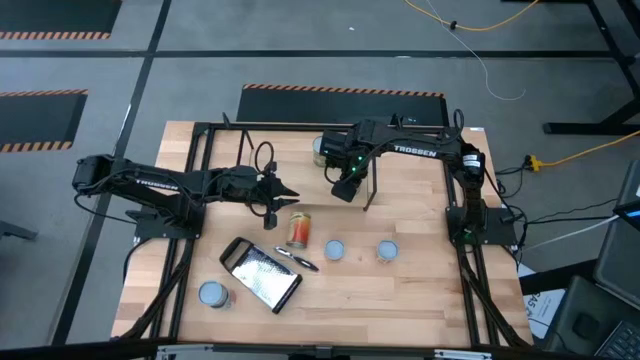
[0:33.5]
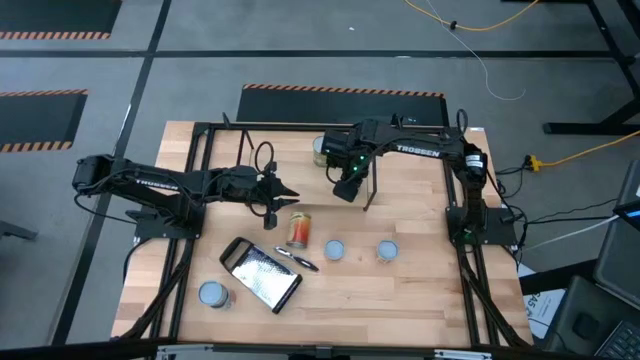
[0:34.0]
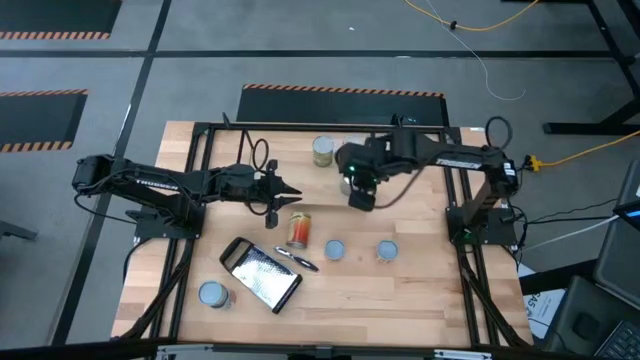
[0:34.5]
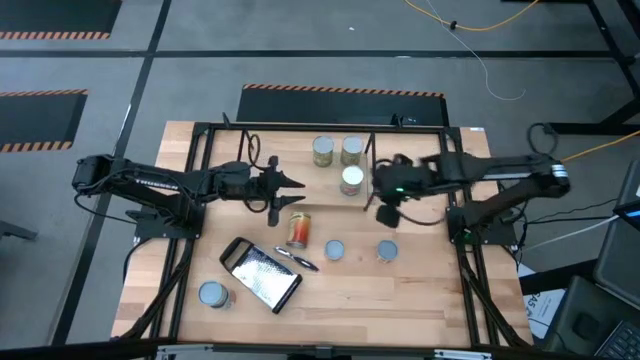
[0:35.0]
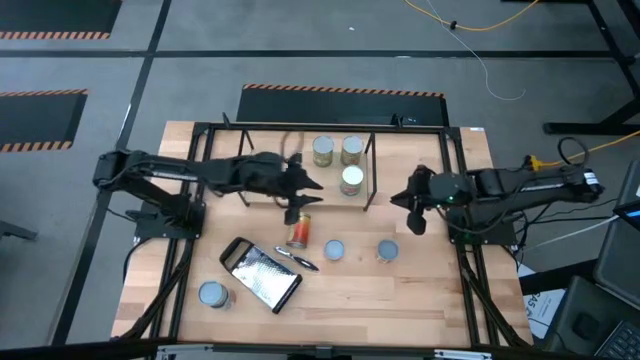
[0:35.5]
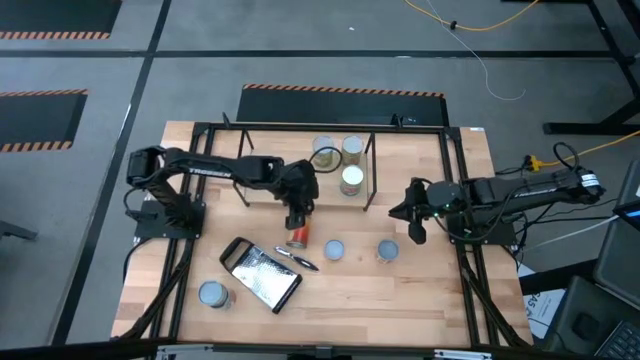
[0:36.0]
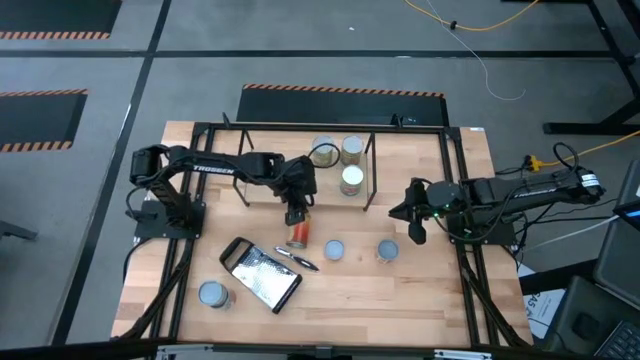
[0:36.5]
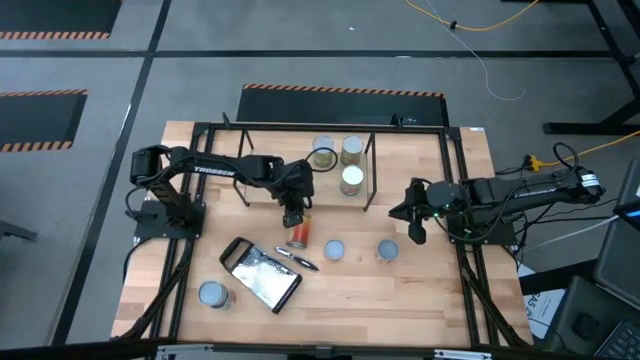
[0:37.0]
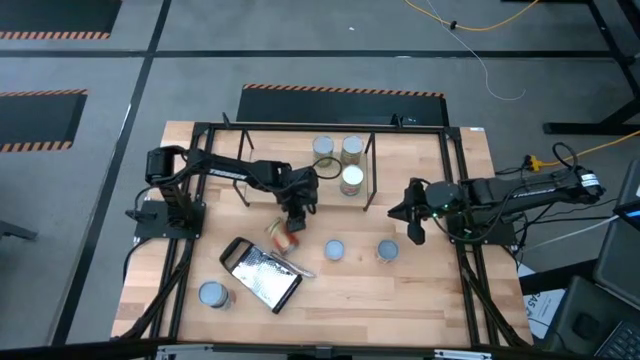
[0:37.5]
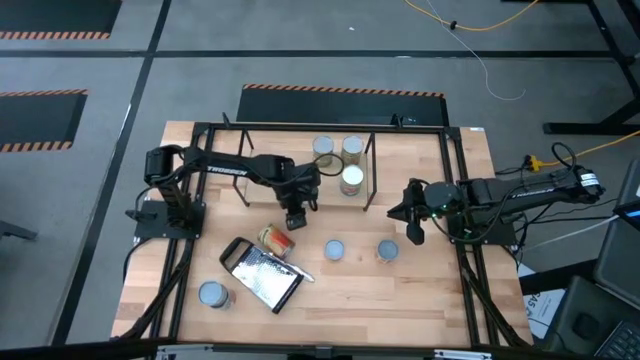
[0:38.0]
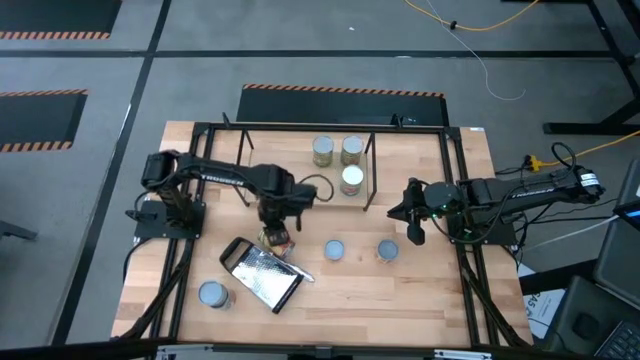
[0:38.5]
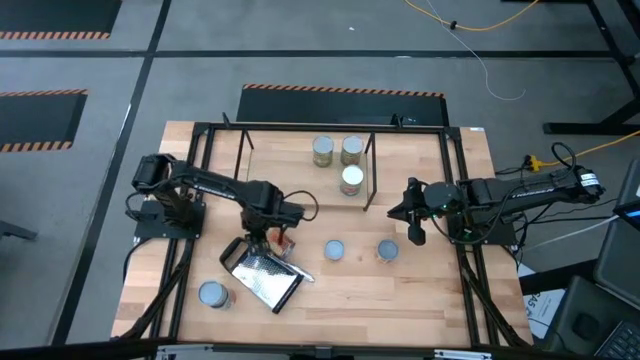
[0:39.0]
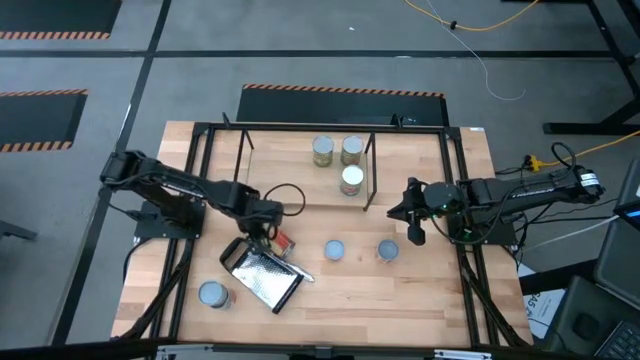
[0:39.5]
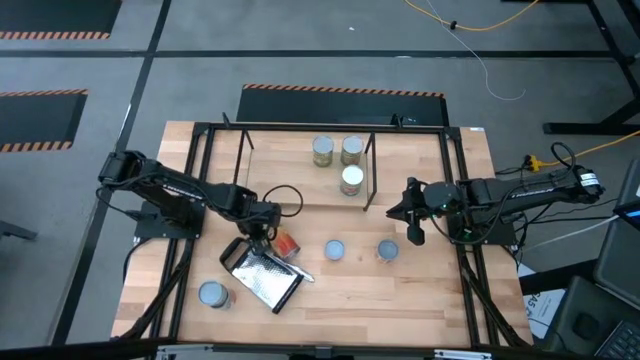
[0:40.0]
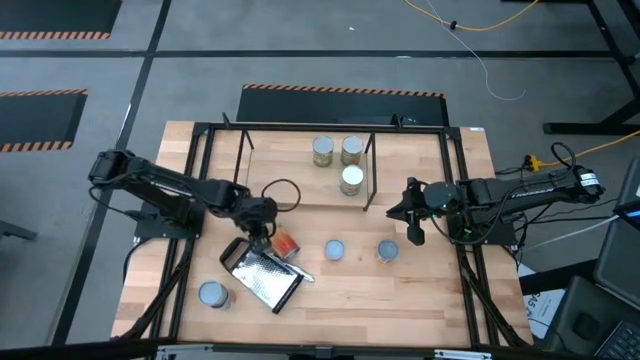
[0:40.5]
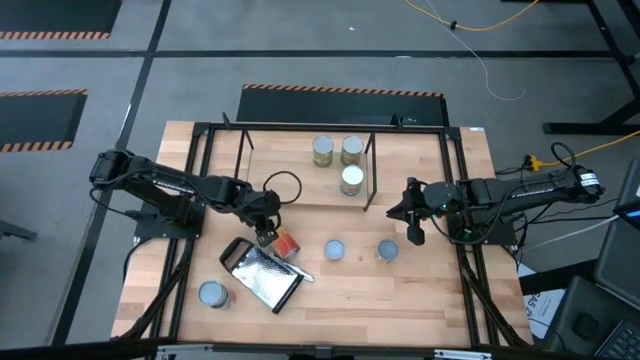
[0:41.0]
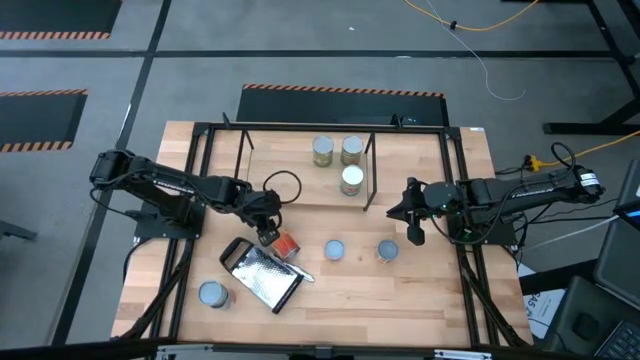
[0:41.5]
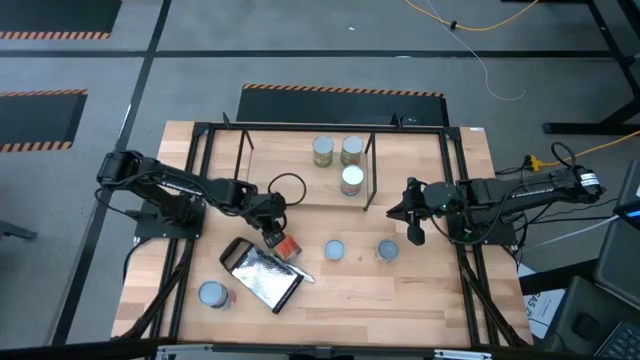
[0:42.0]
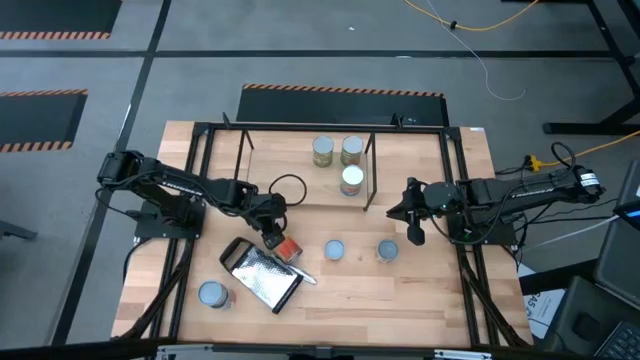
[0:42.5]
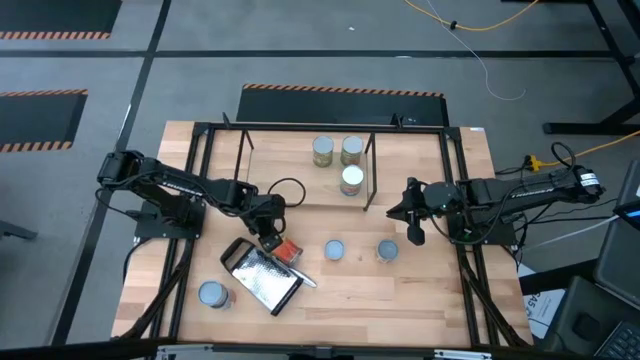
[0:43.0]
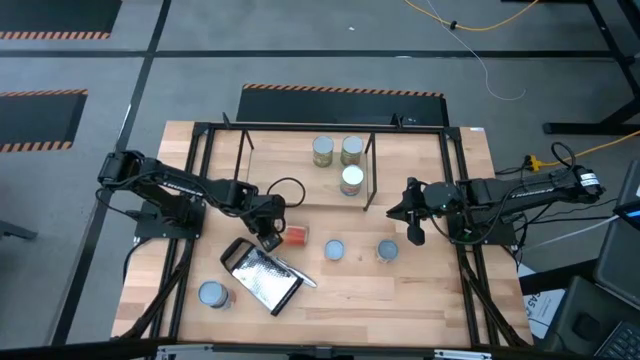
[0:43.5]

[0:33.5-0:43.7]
Task: Pick and place cans onto a shelf
Put the canned pineapple on the shelf

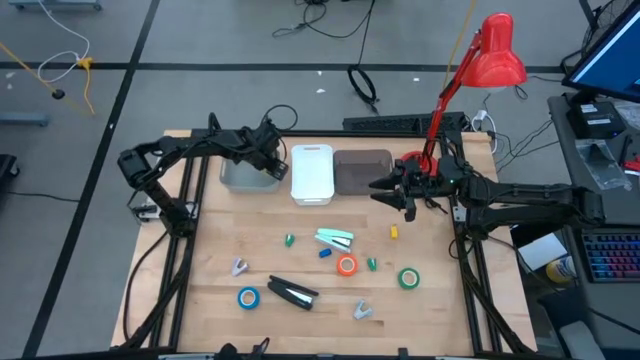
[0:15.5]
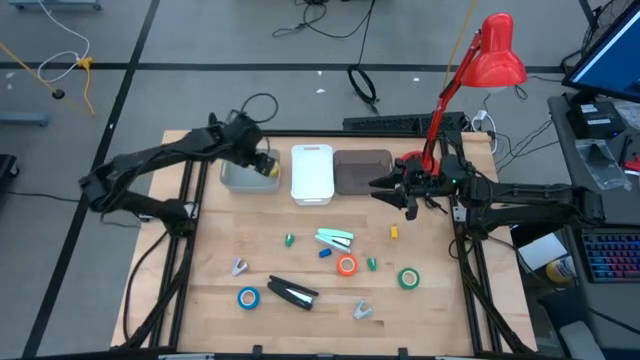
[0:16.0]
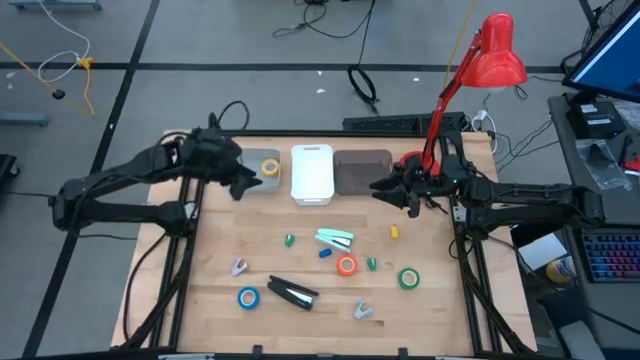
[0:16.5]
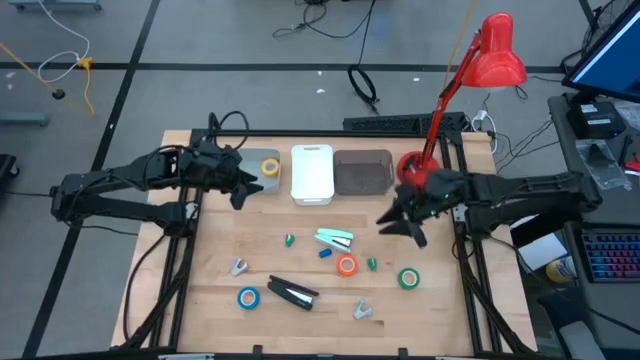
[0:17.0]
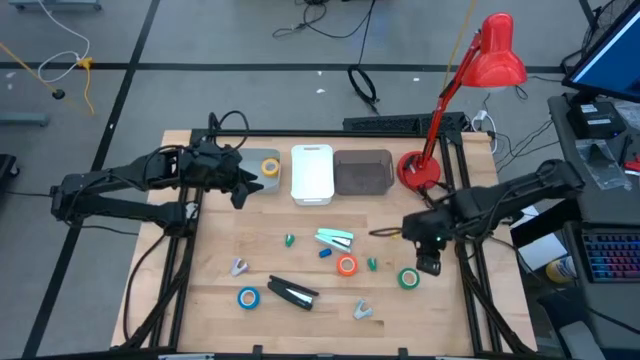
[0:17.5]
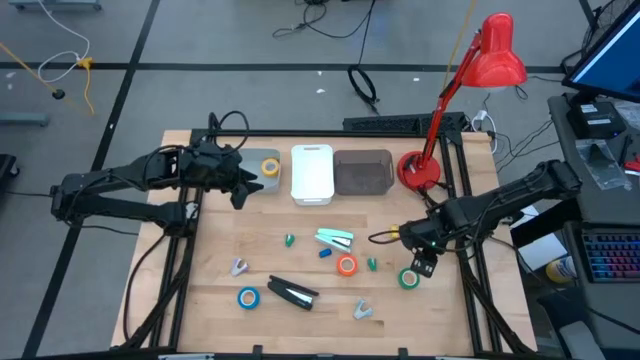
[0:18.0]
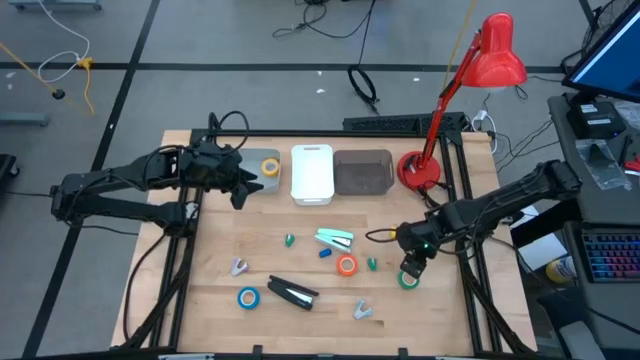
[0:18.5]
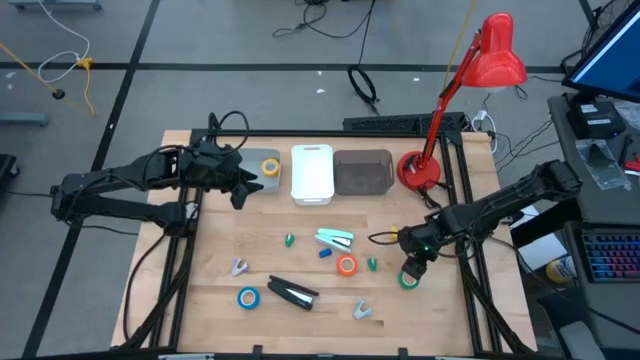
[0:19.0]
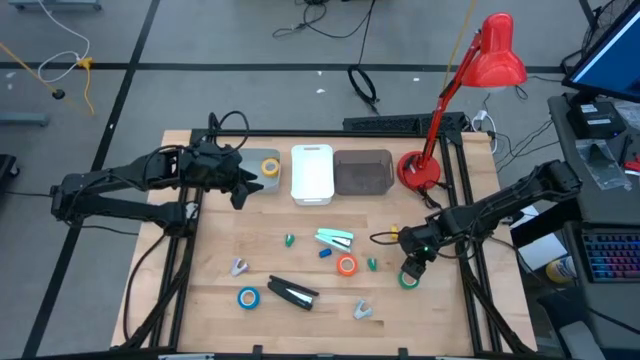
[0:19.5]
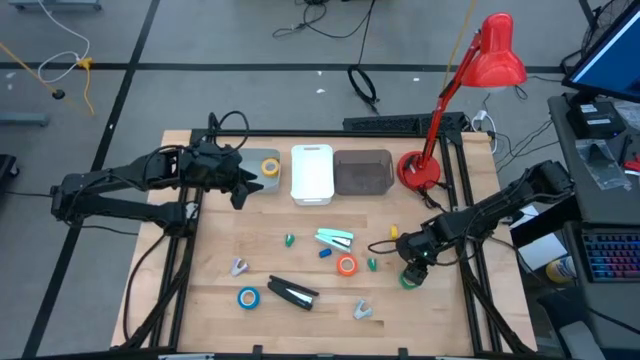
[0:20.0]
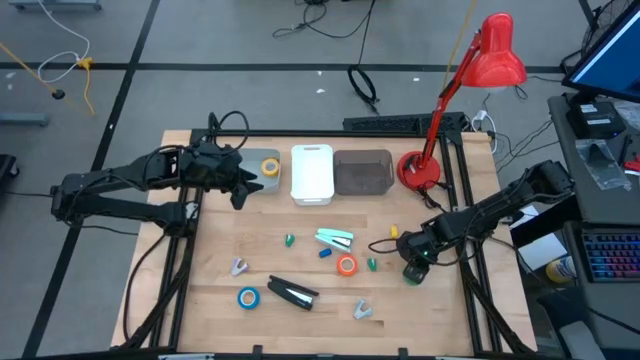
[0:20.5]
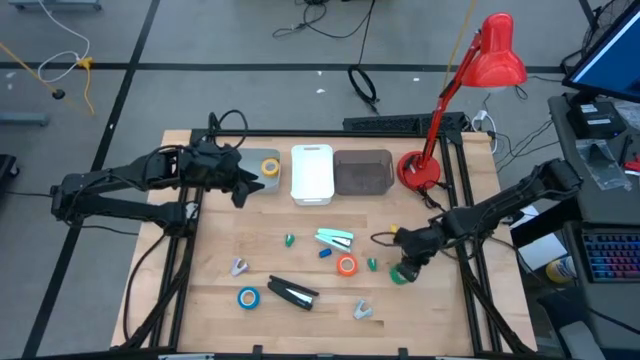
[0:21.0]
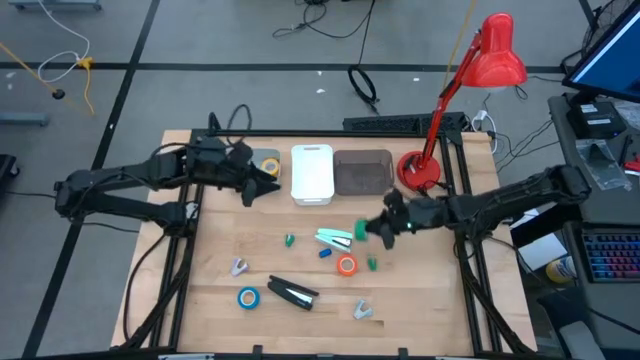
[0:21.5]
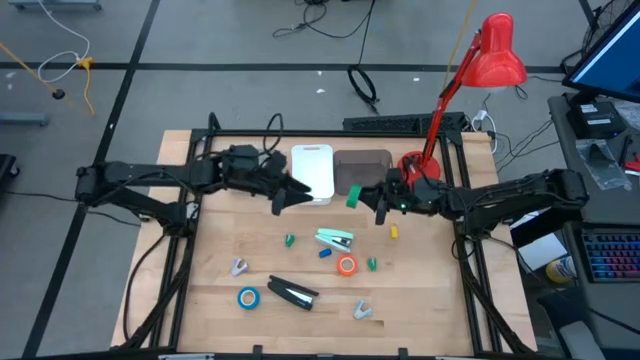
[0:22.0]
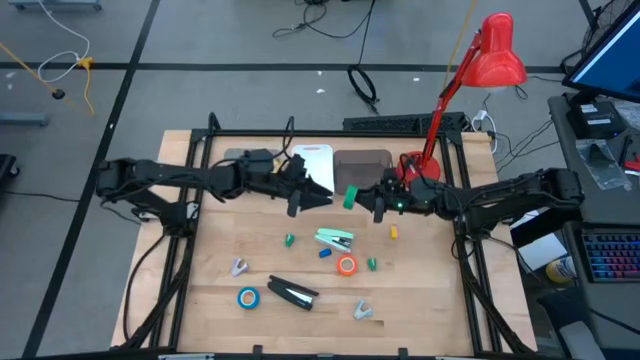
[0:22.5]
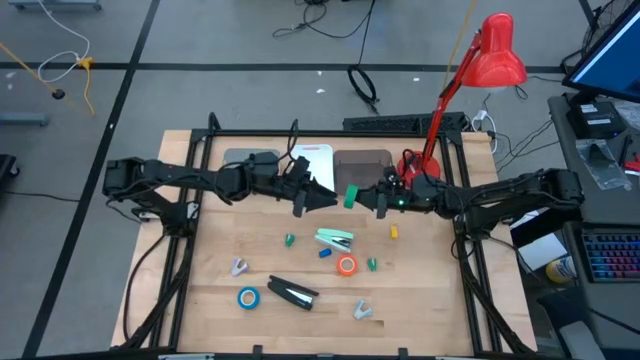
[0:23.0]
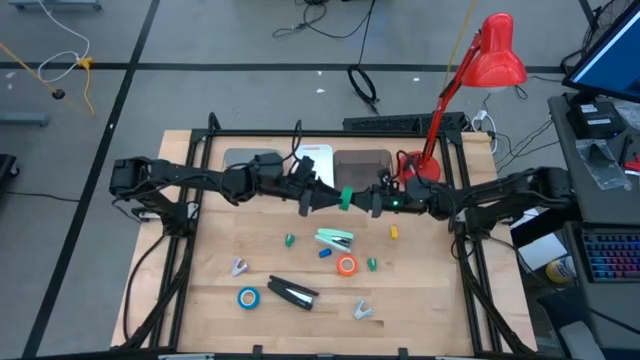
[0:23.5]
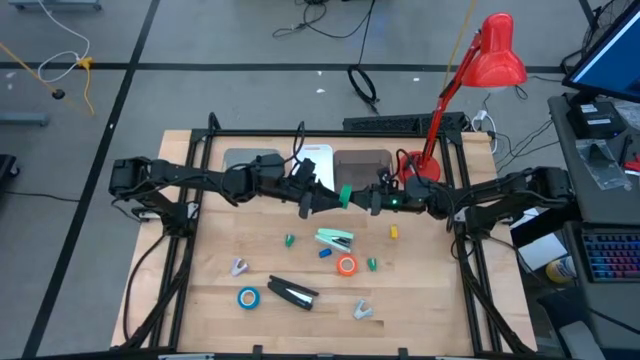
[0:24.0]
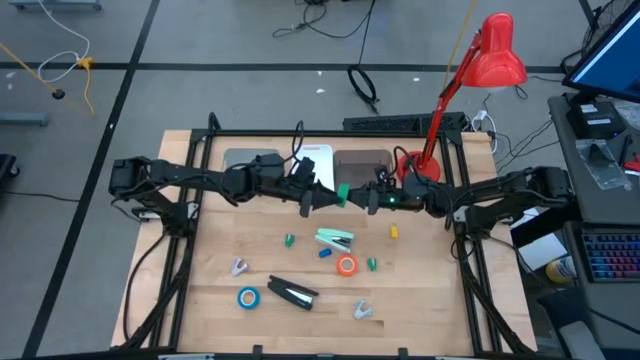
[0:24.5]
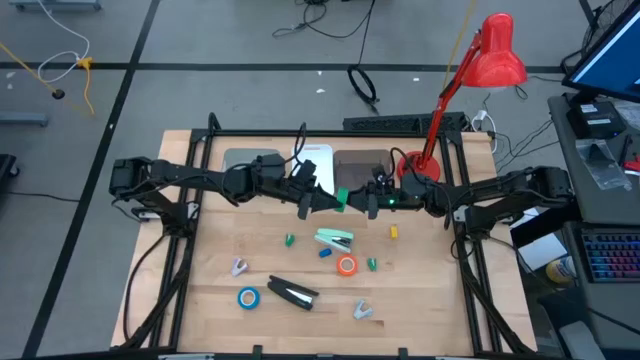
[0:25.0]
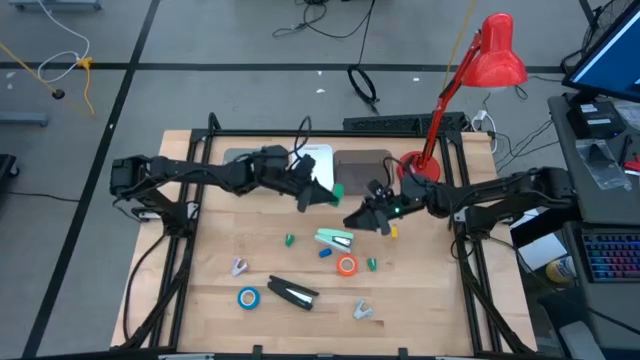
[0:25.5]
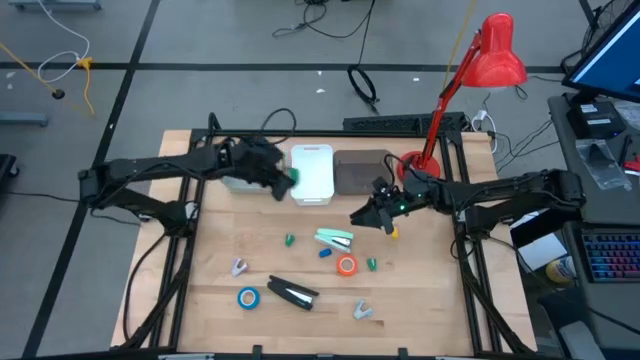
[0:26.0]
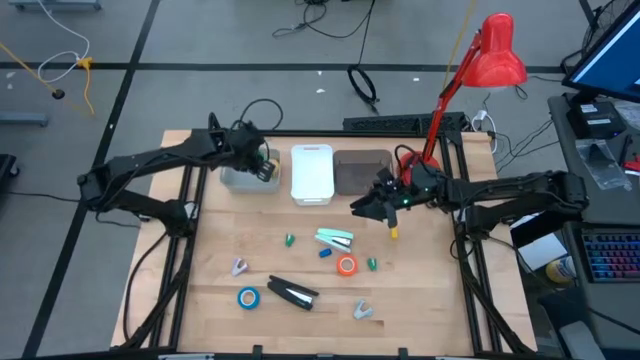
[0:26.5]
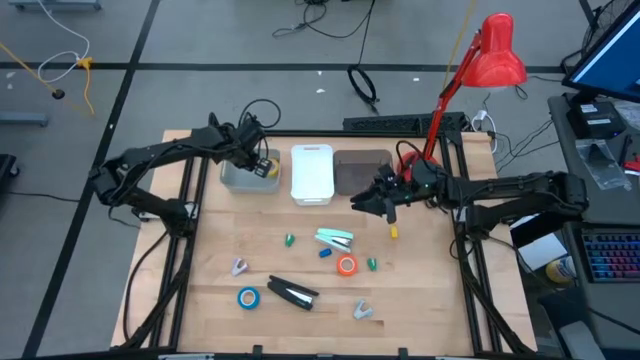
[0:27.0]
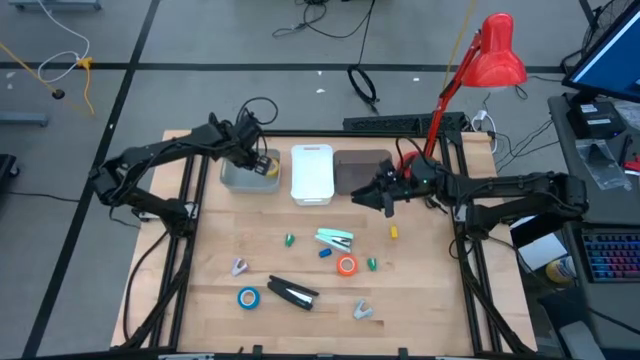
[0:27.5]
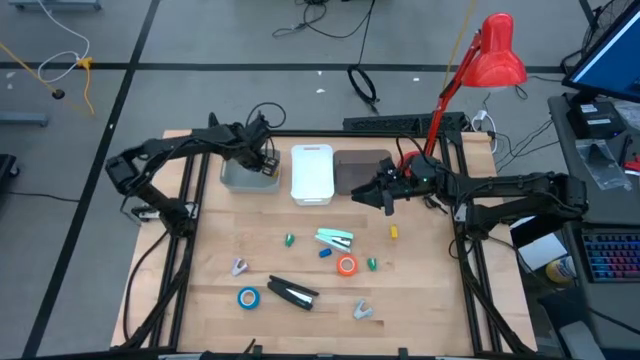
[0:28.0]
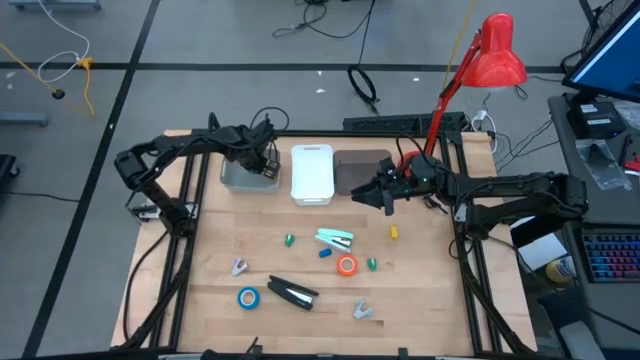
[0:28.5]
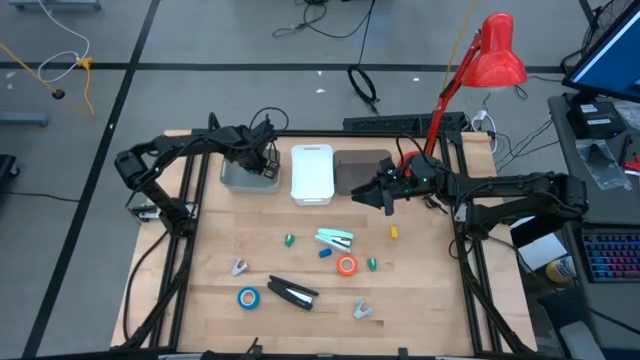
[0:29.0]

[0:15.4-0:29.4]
Task: Pick and place Stapler, Stapler remover, tape
Put the green tape into the gray bin
